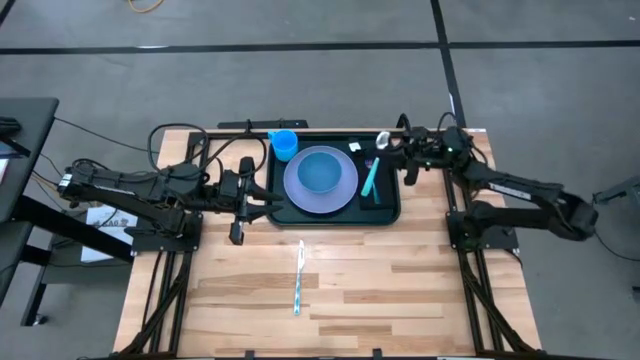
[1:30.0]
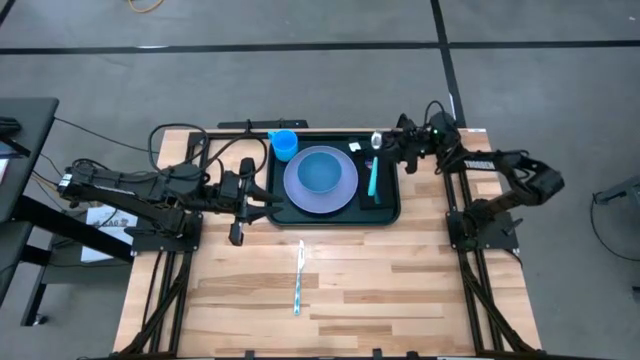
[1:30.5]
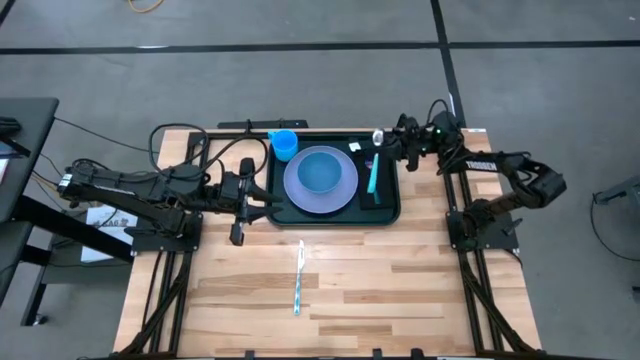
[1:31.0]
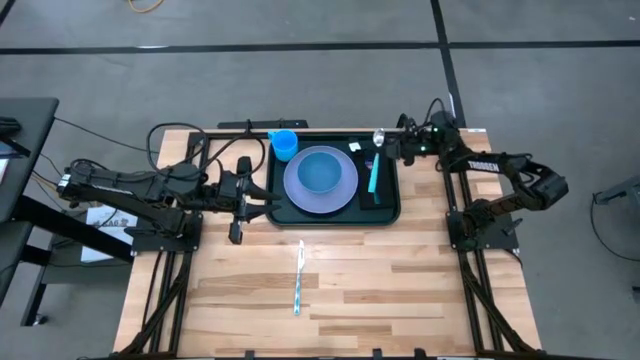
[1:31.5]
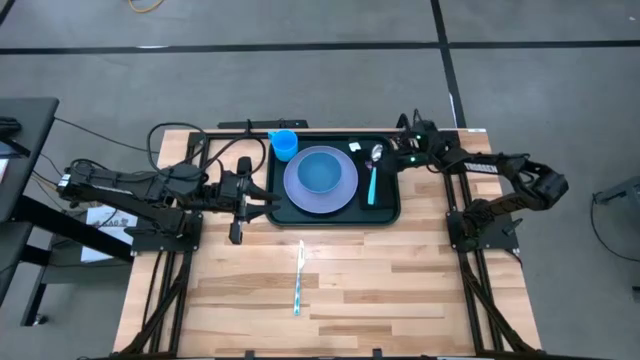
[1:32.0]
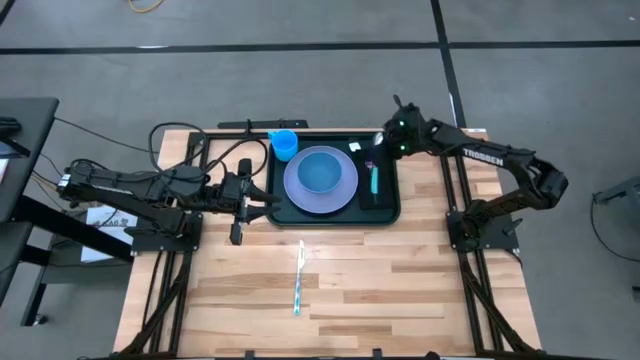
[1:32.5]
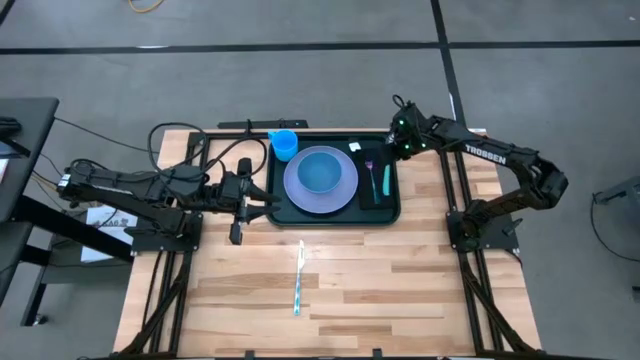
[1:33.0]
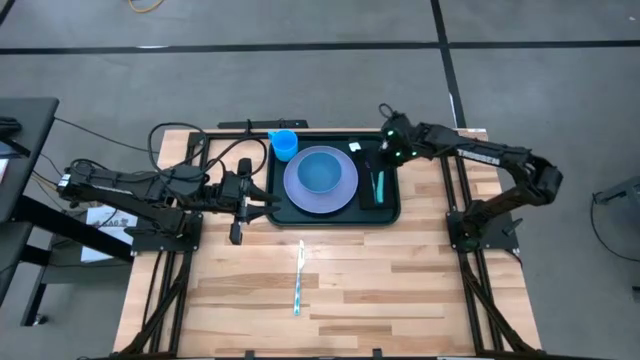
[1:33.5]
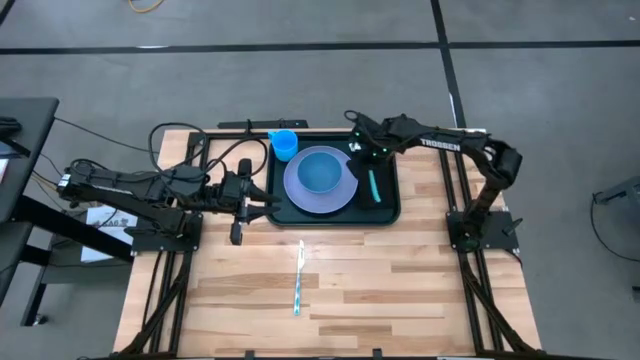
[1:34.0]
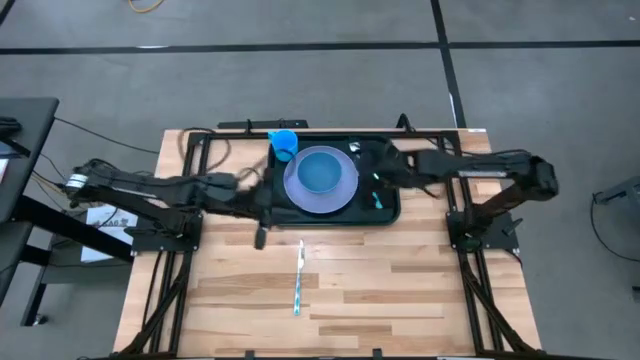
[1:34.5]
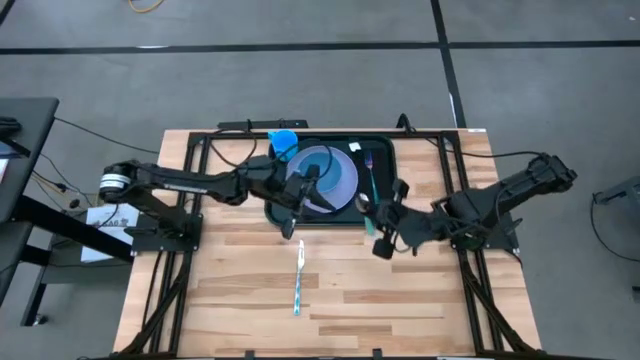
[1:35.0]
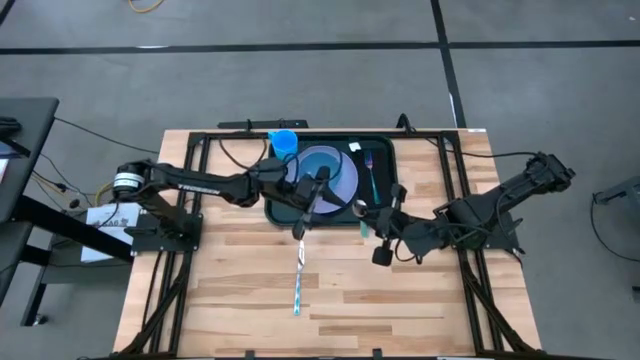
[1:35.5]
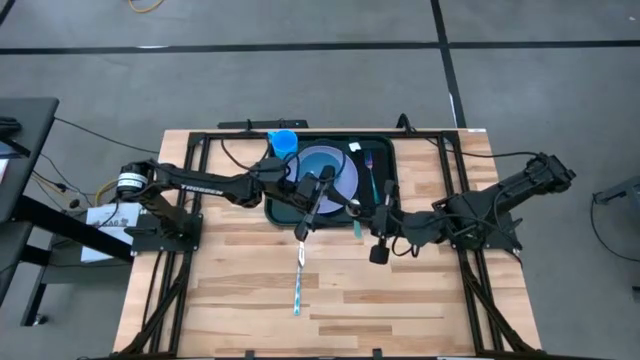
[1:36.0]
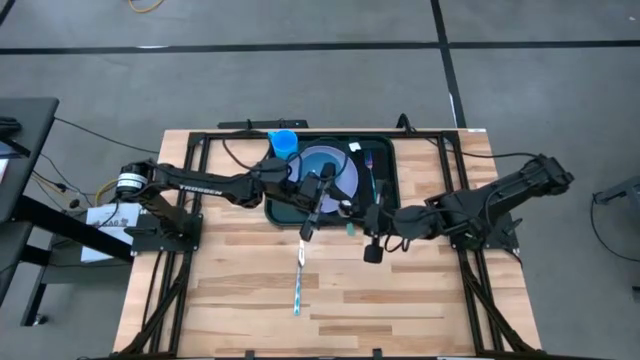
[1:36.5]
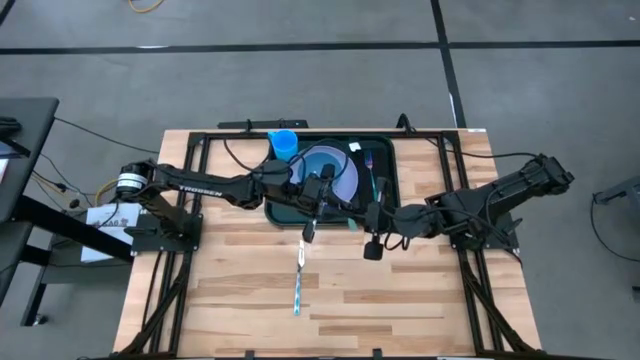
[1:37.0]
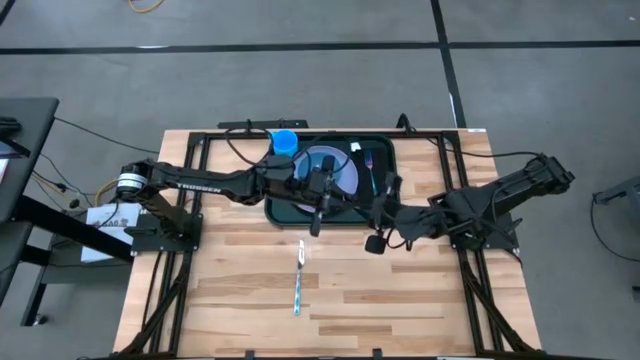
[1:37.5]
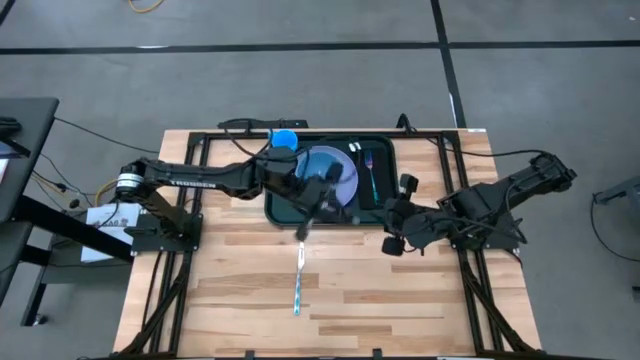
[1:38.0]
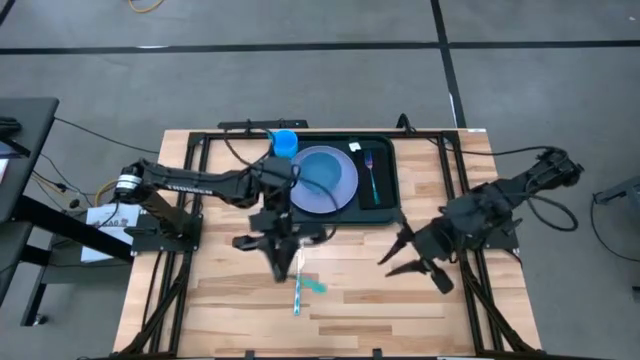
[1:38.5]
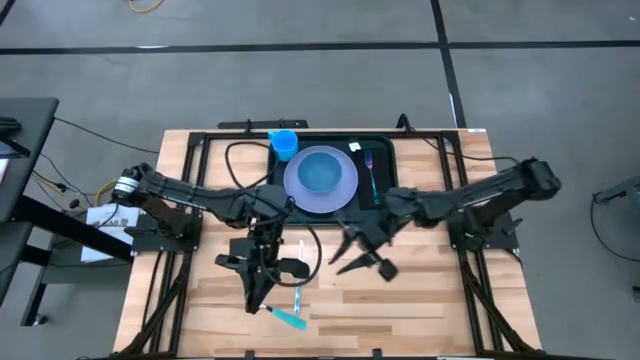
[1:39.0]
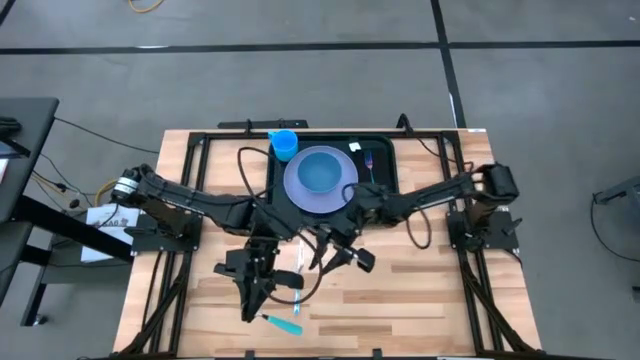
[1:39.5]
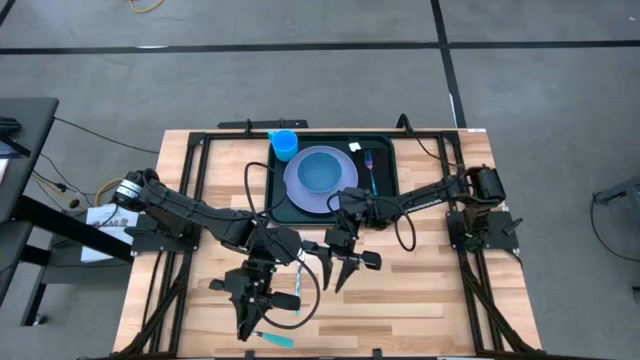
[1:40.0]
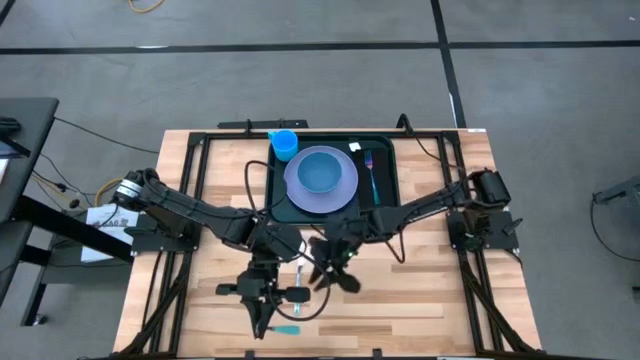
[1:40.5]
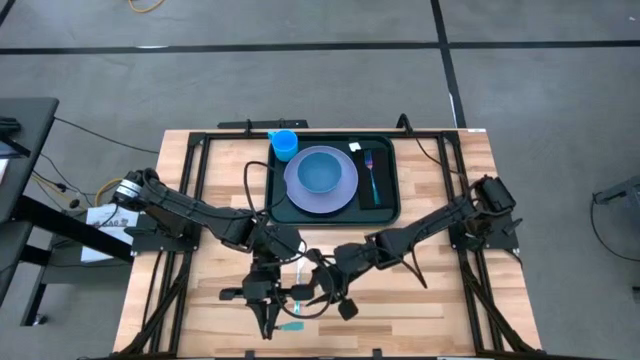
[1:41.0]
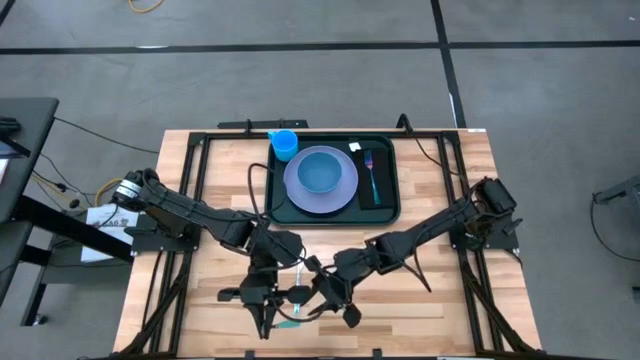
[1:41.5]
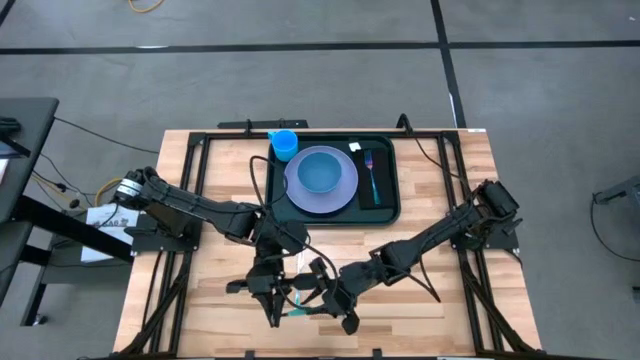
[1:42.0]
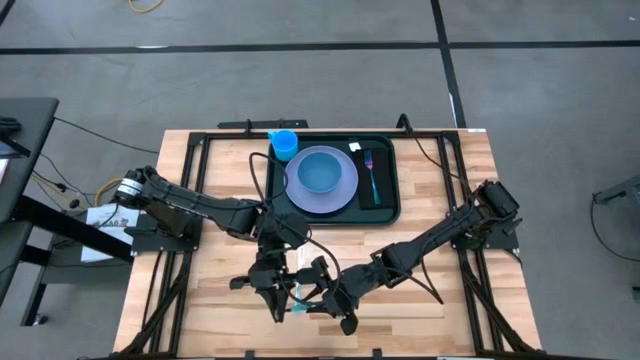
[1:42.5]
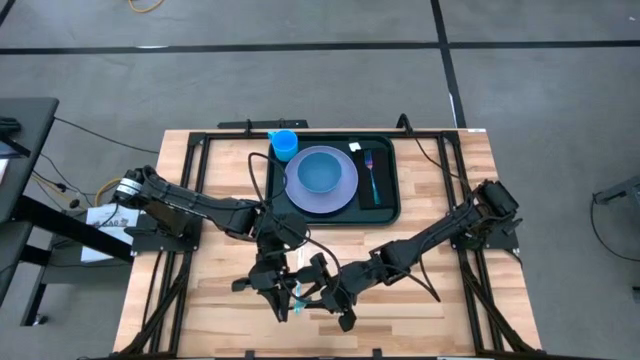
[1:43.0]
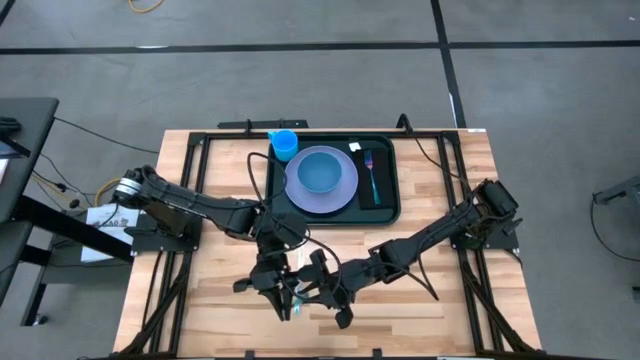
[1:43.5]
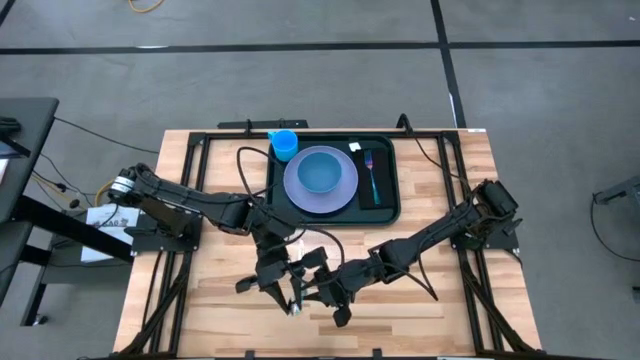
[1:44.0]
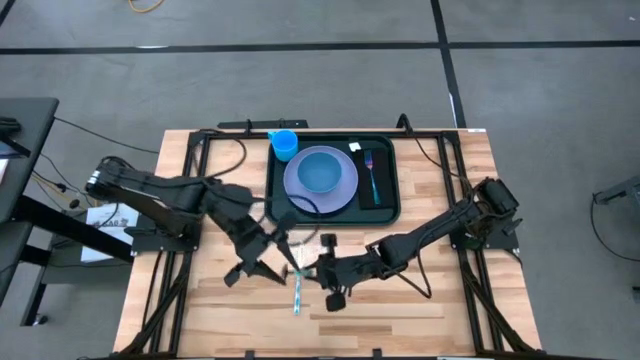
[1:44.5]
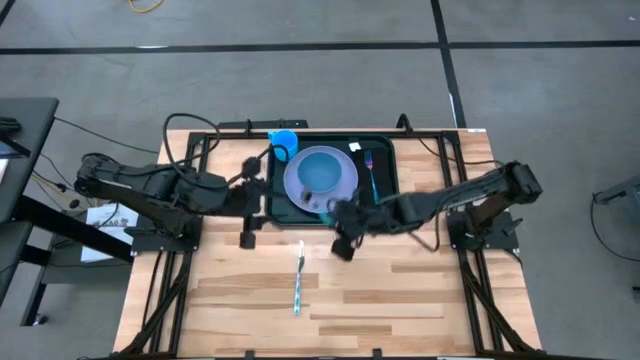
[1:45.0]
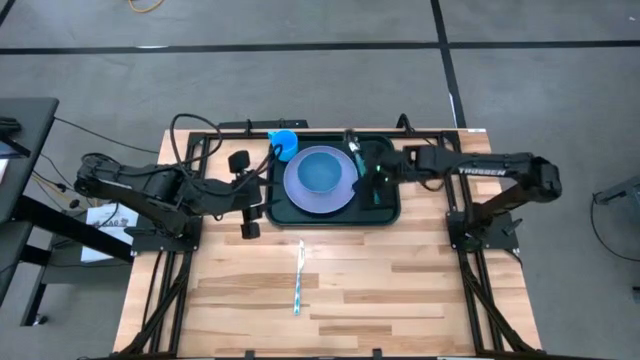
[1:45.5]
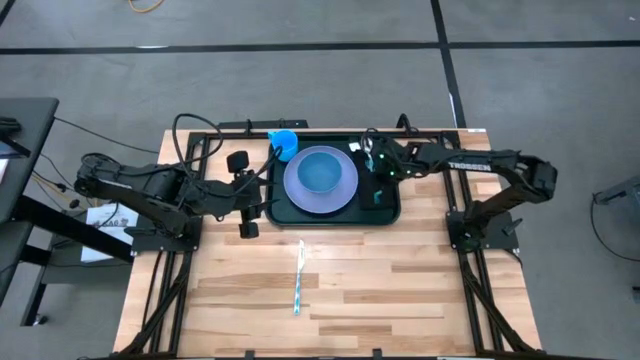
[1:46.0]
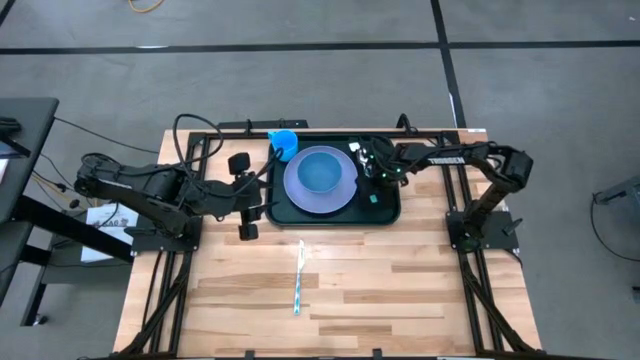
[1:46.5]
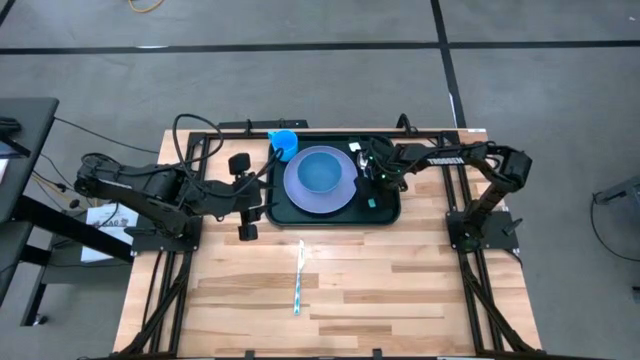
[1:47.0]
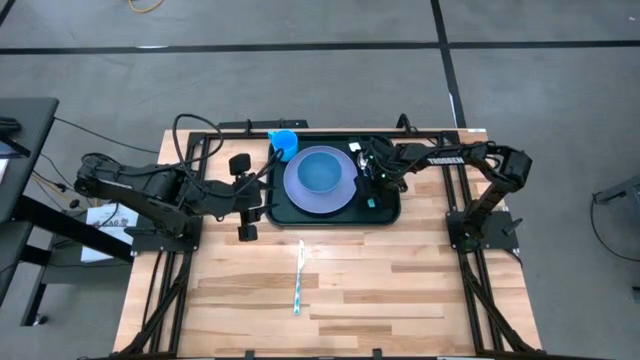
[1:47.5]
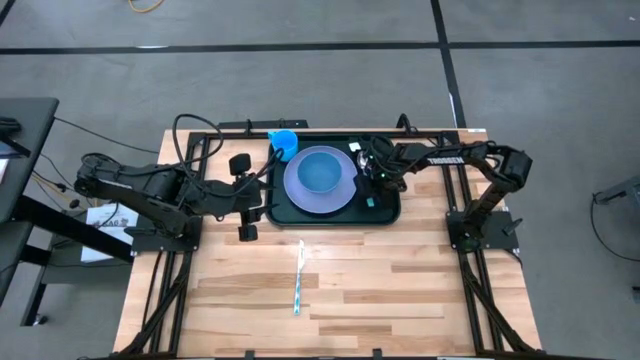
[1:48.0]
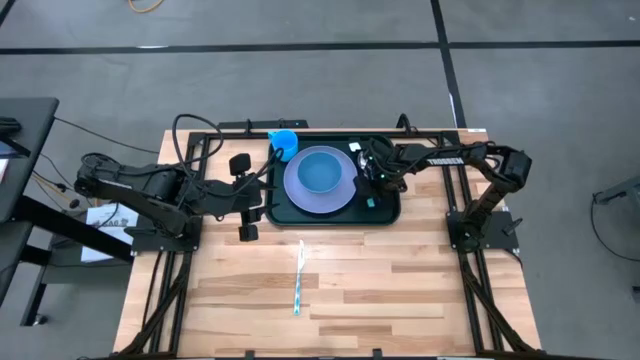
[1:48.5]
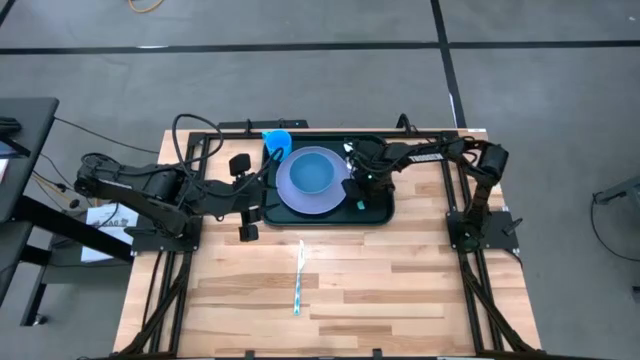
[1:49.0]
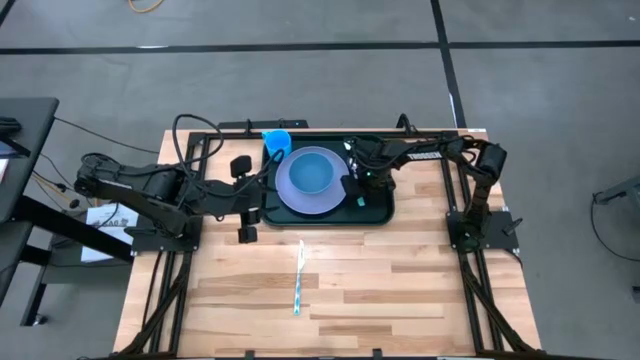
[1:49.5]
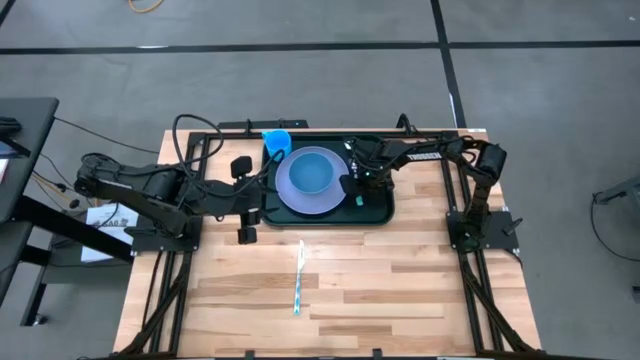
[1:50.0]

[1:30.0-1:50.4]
Task: Set up tray
Put the spoon on top of the table napkin to the left of the table fork on the tray

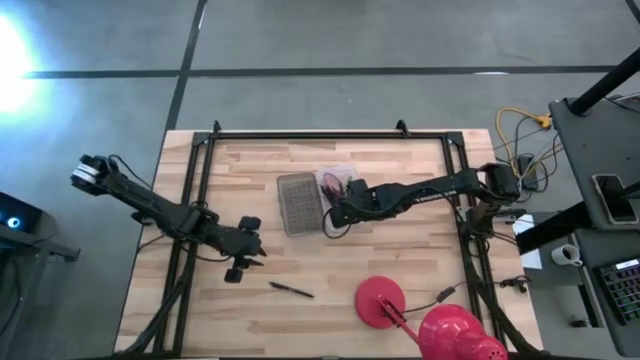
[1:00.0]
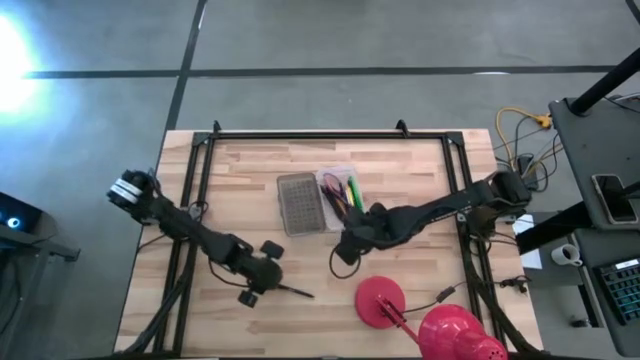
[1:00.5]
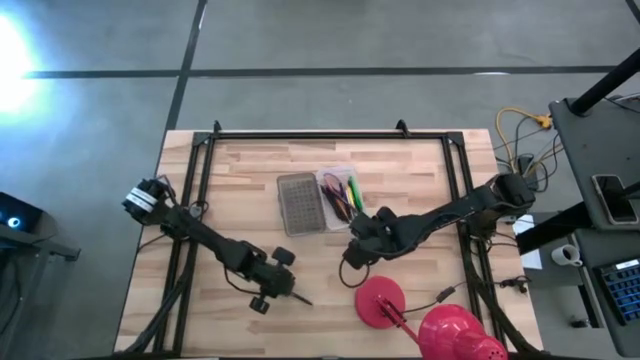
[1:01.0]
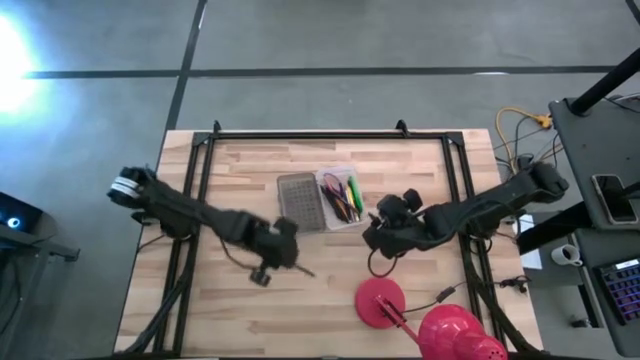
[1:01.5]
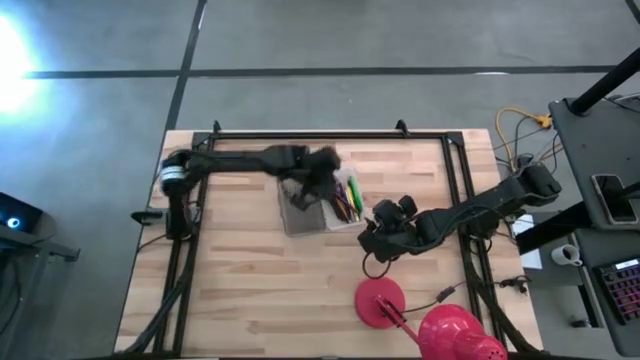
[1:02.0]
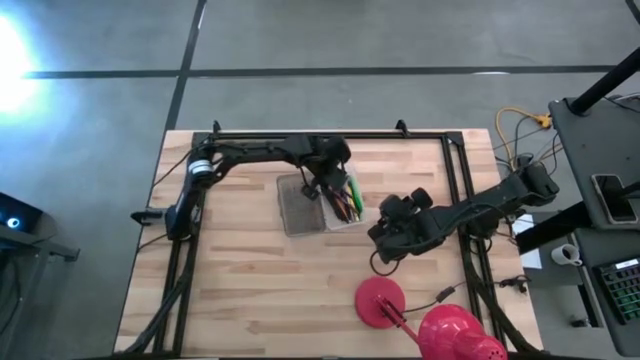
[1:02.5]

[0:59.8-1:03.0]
Task: Pick & place school supplies into a supply box
Put the black pen into the black supply box
